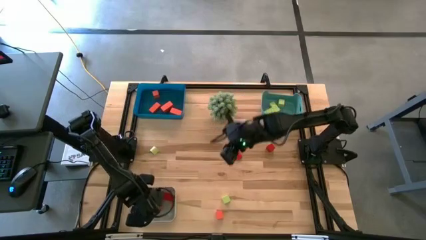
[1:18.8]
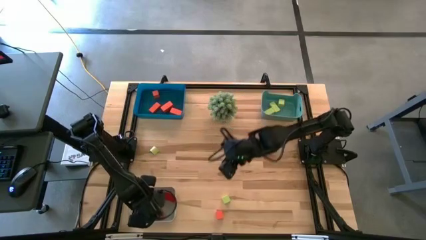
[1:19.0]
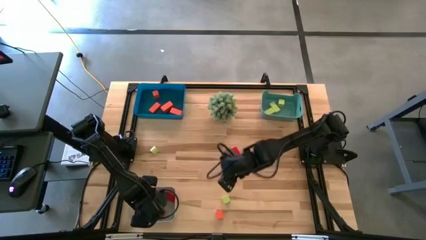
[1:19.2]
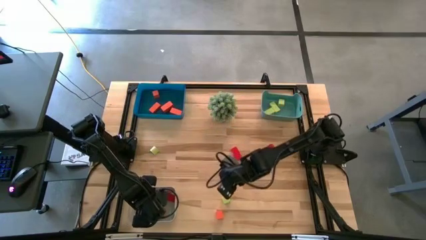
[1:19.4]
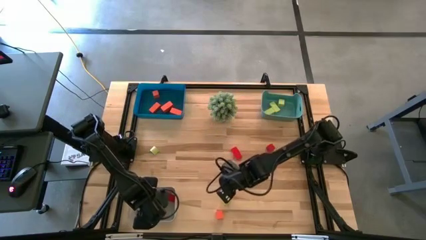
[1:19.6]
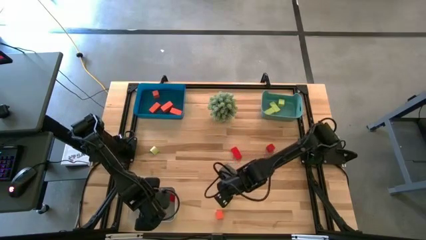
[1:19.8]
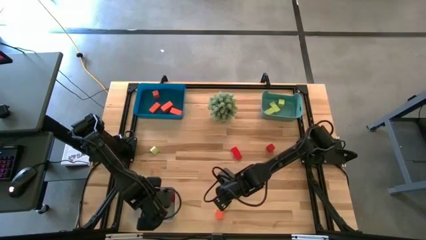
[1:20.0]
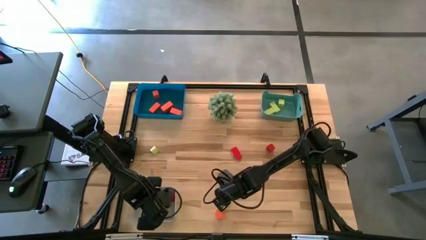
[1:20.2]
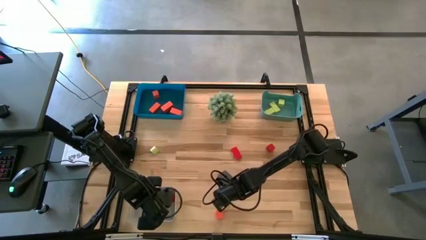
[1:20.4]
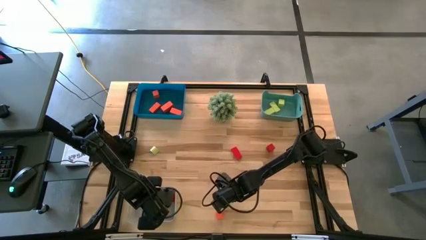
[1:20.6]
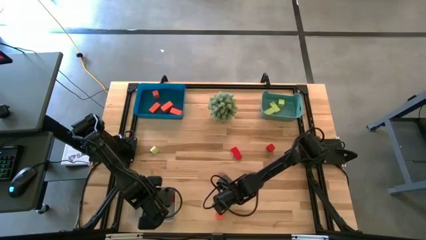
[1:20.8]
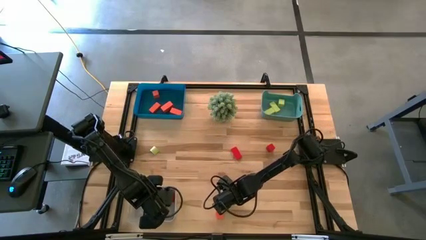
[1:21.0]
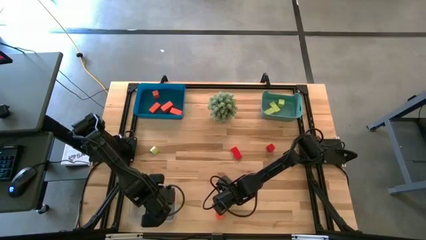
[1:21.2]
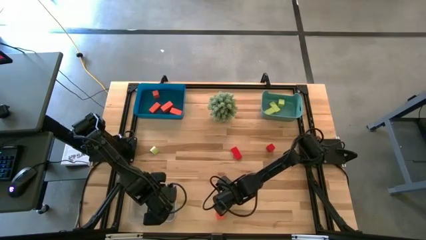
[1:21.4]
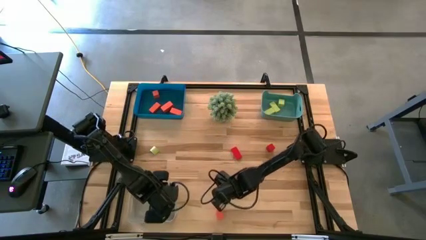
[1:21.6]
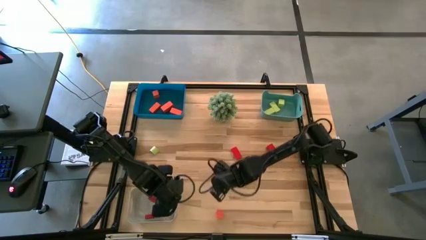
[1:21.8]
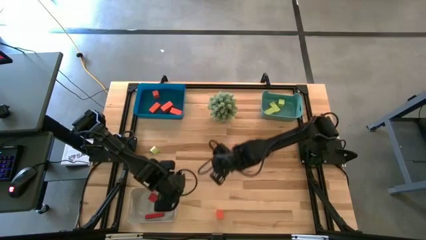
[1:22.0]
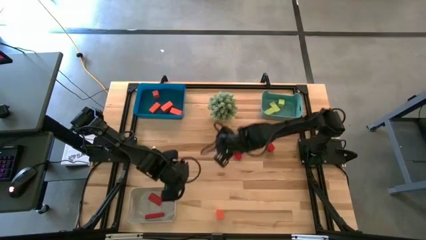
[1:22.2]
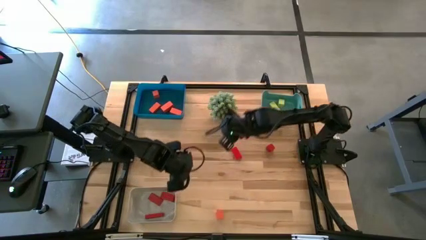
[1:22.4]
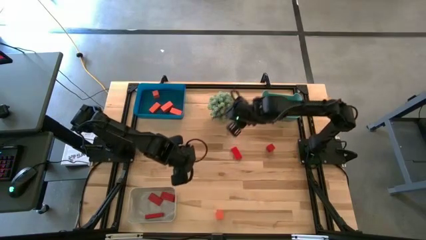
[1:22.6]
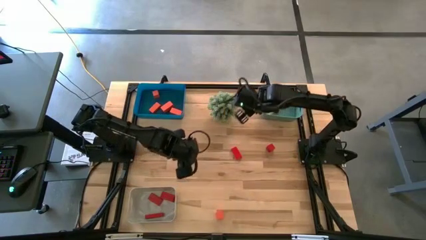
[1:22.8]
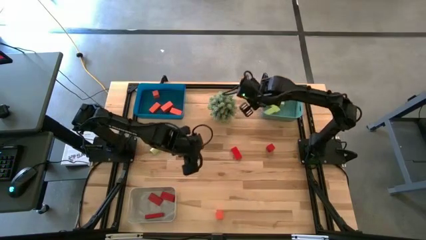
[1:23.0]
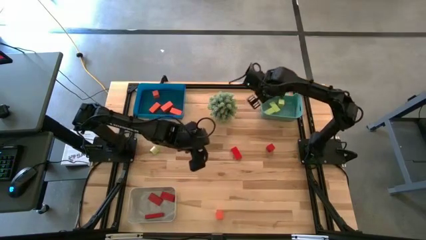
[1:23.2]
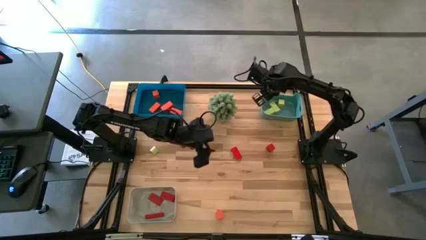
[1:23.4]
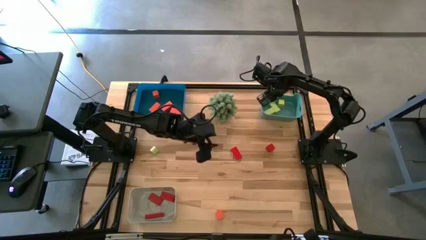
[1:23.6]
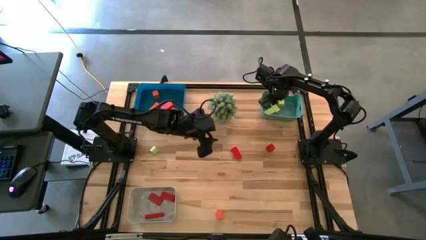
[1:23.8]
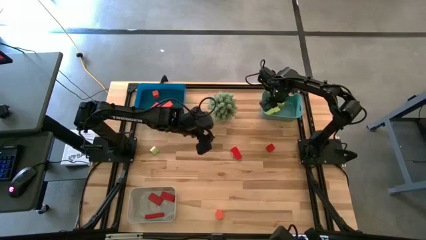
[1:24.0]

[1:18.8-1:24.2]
Task: Sort & place blocks by color
Put the light green block into the green bin

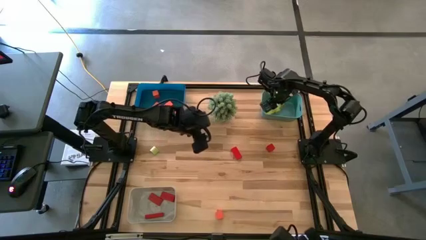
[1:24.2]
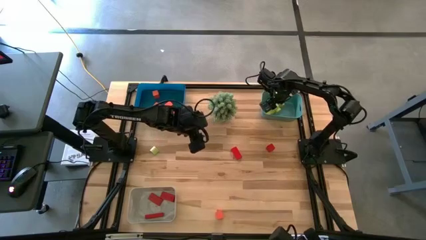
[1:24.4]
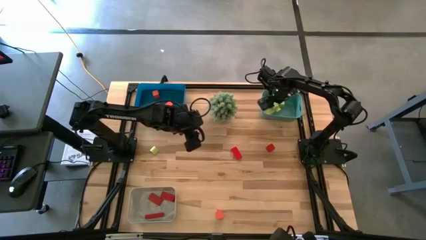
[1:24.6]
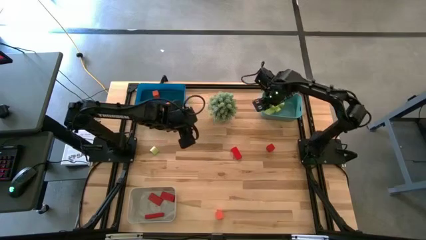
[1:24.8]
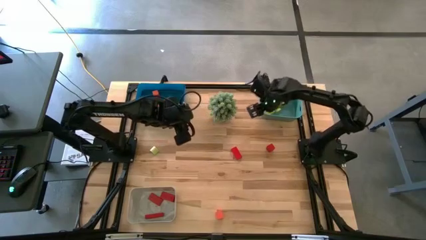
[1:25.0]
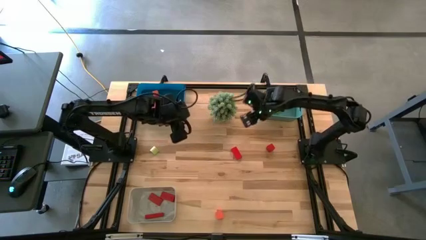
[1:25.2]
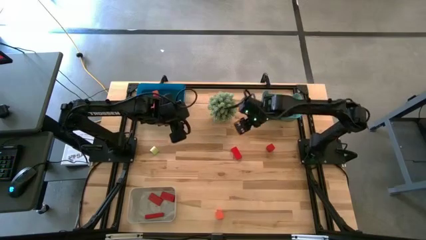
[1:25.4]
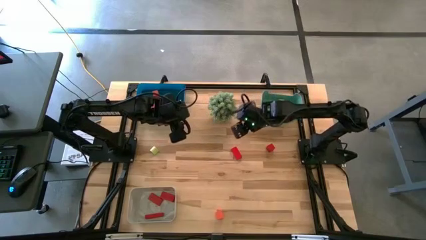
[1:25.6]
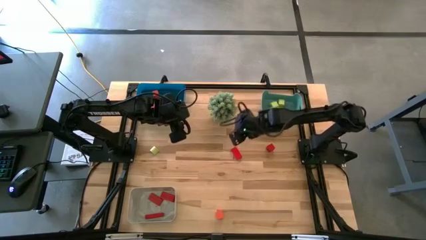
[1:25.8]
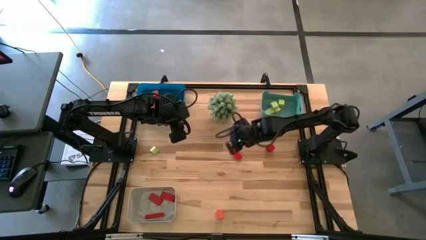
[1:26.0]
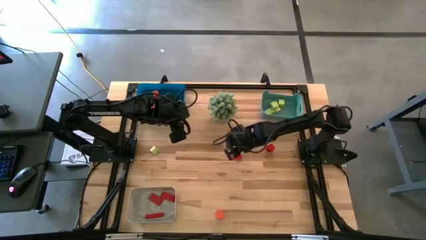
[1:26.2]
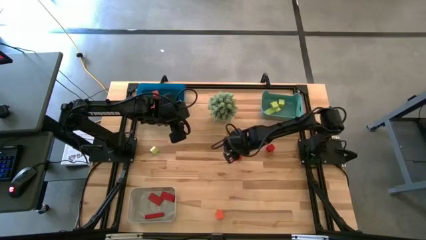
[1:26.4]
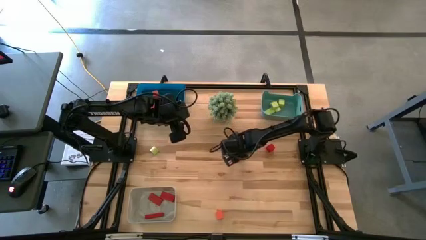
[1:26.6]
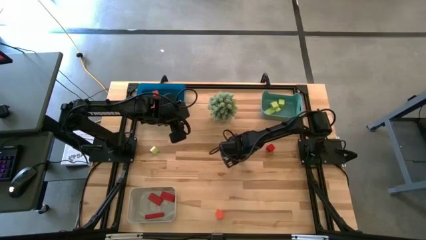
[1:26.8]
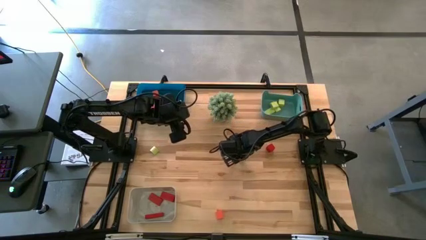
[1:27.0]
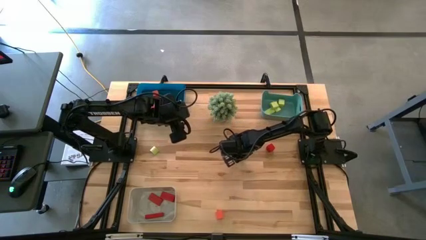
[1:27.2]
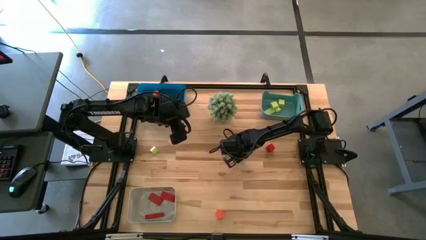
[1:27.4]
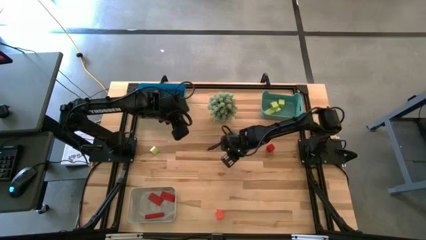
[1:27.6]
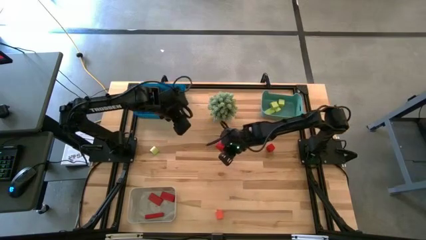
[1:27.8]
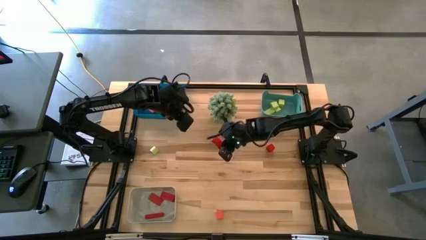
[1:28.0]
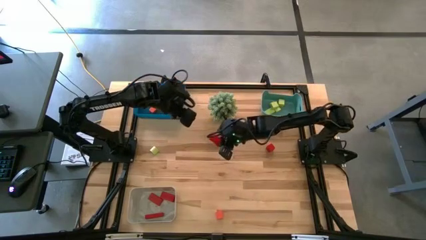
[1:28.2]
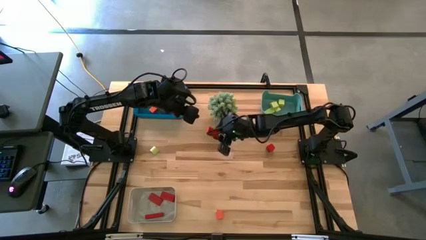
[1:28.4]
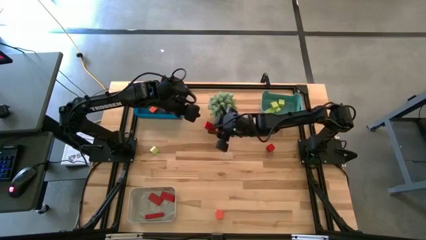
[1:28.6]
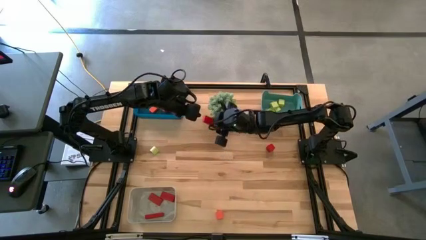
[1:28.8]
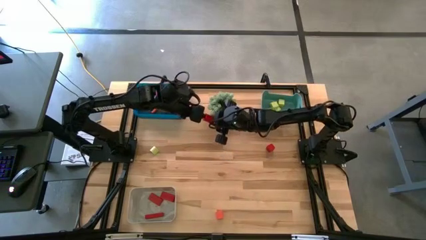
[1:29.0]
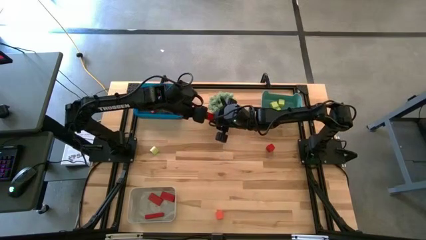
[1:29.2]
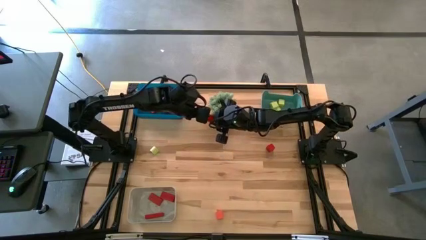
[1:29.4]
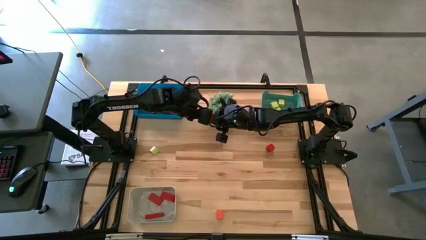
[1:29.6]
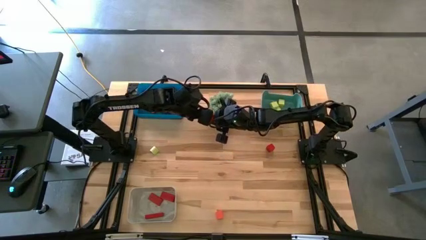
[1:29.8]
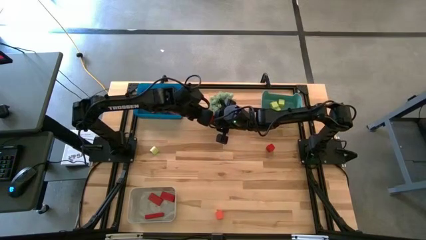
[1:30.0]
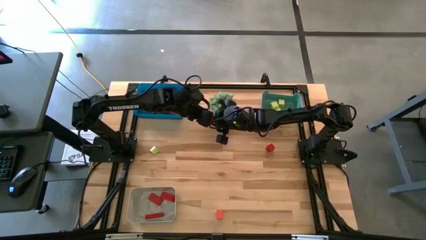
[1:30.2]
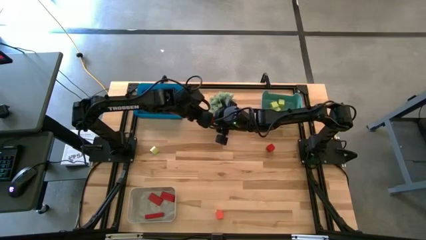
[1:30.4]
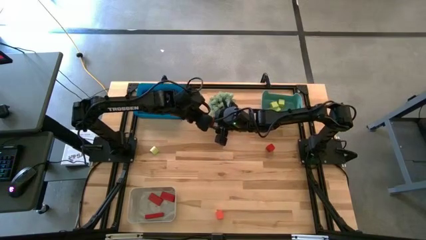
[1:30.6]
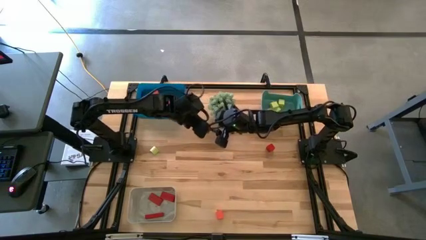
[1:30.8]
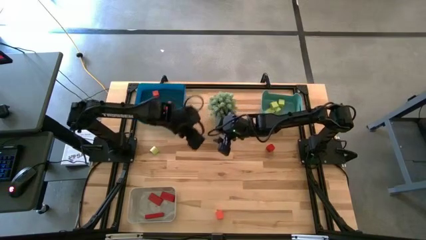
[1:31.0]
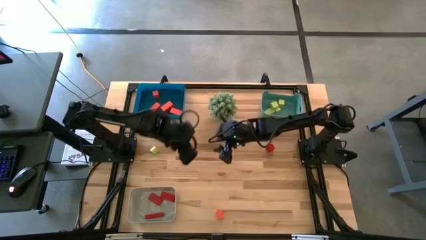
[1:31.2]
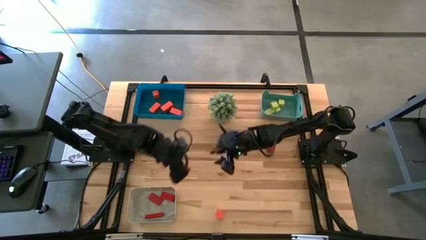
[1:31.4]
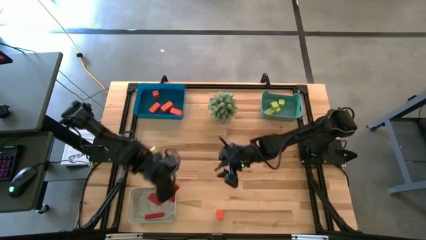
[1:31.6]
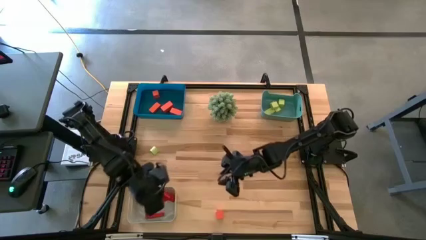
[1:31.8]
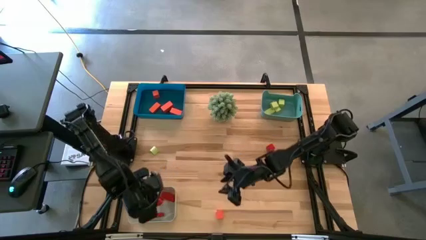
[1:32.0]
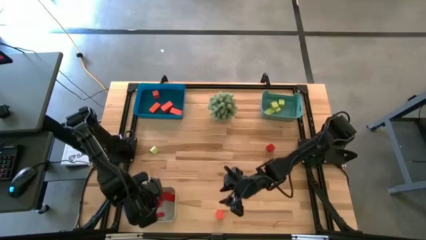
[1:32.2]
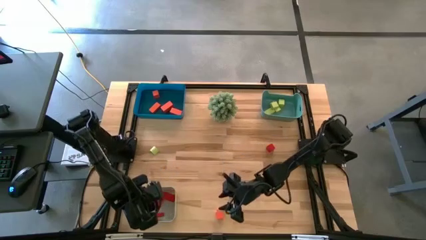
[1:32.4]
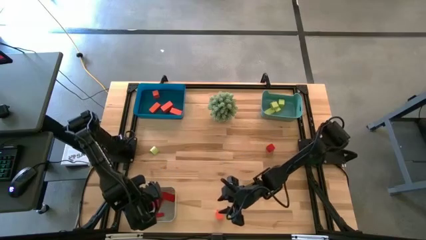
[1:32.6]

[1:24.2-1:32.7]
Put the red block into the white bin

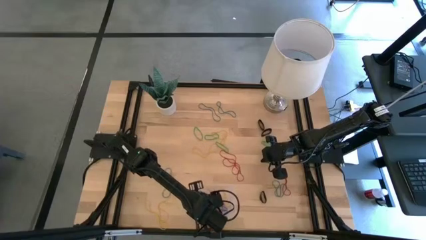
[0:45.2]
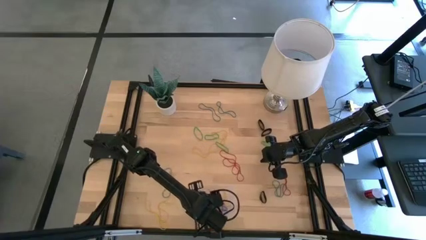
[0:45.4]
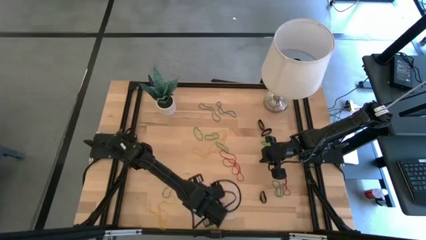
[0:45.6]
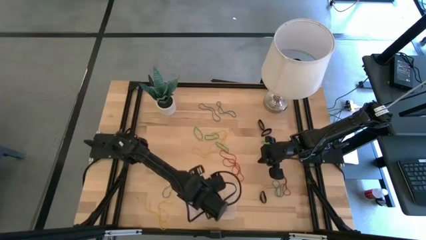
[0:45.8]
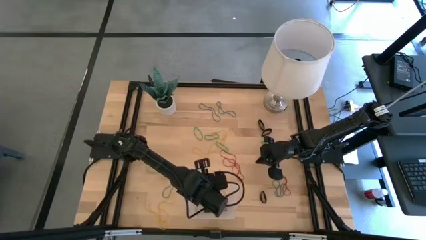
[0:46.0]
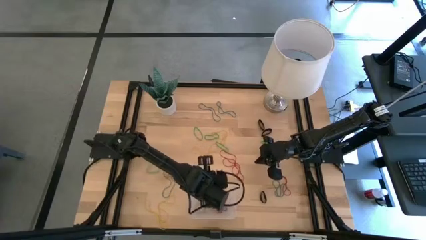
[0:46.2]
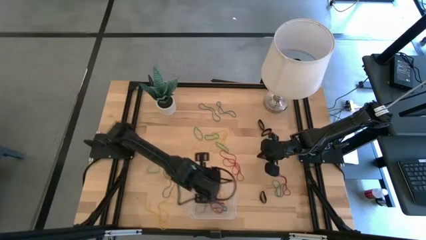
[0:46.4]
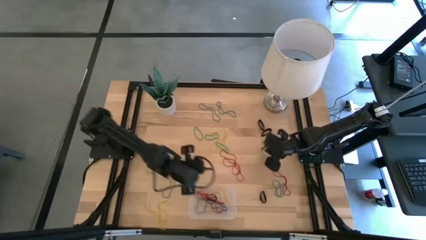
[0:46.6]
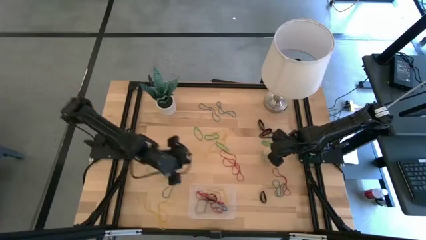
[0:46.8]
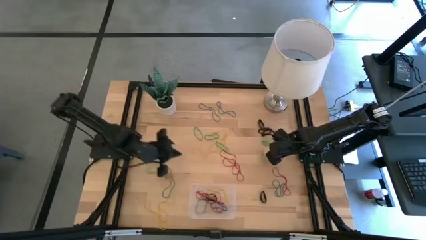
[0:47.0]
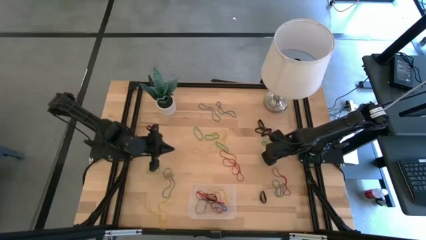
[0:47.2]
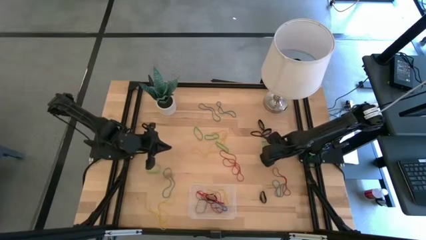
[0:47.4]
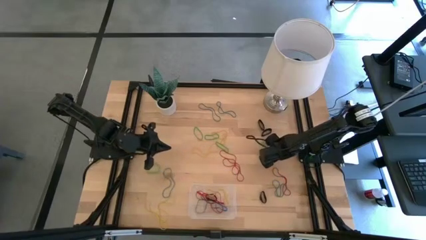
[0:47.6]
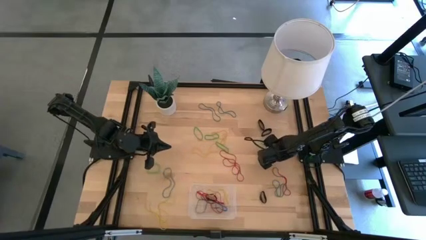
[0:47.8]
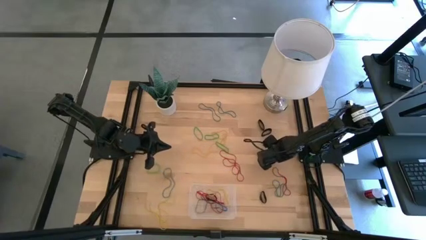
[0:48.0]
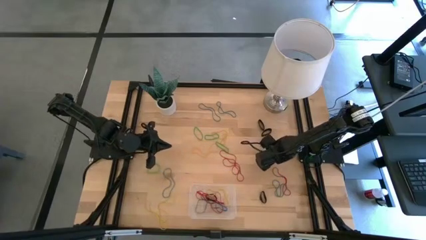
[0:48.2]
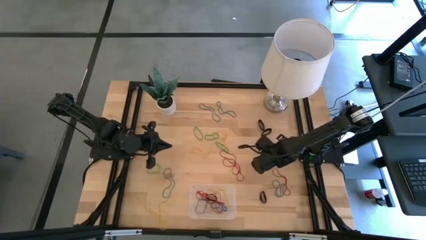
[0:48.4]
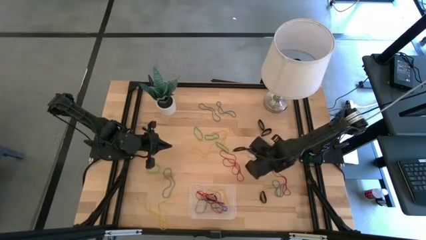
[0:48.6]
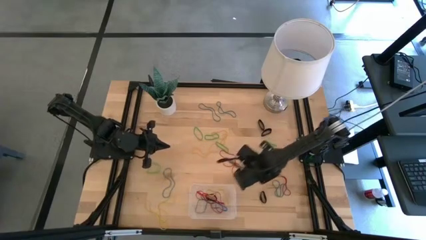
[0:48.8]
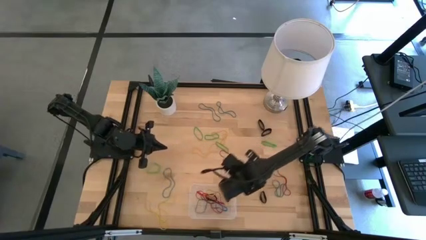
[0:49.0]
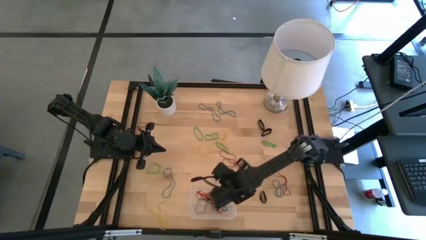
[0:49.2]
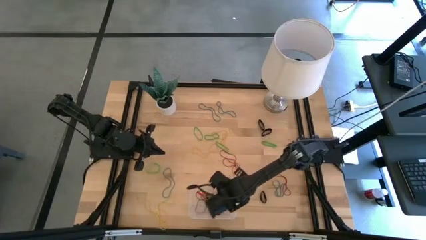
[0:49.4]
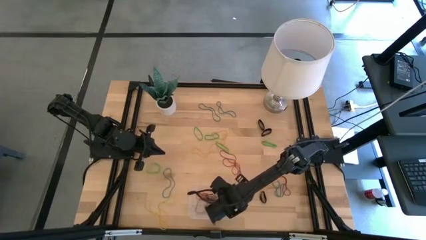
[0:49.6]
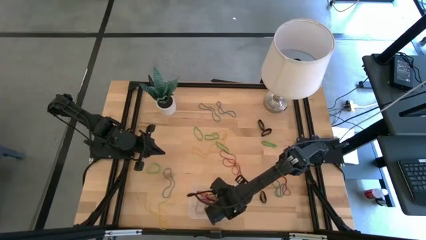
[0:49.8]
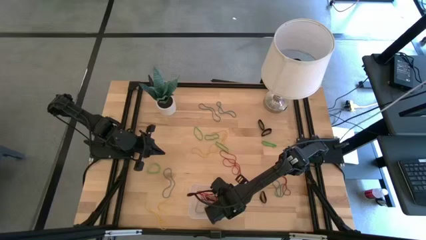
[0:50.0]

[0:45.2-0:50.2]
Task: Pick and place rubber bands into bin
Put the green rubber band into the transparent bin
